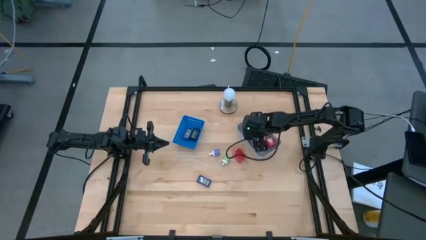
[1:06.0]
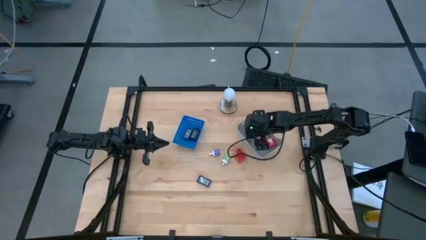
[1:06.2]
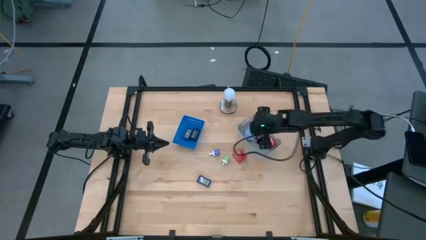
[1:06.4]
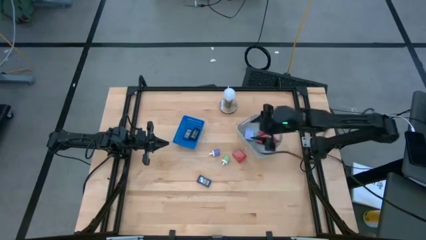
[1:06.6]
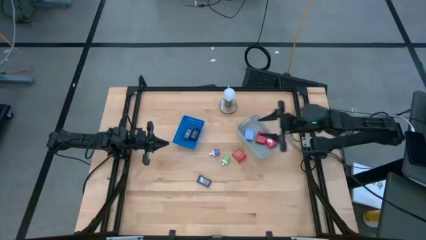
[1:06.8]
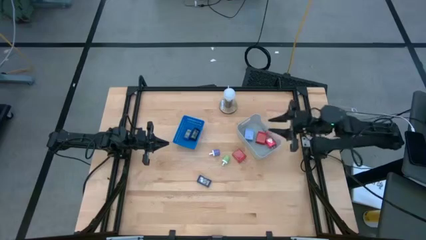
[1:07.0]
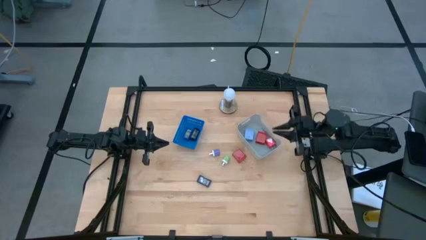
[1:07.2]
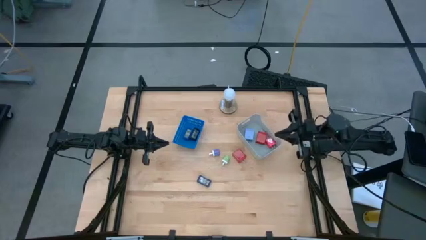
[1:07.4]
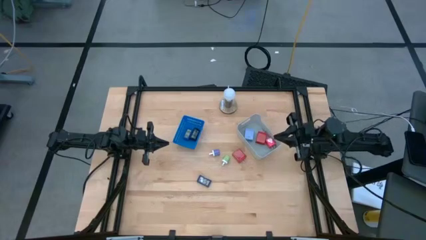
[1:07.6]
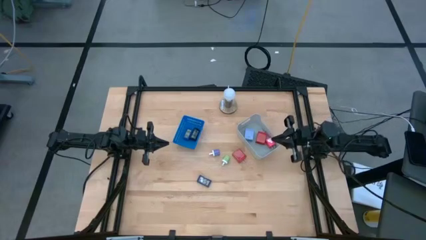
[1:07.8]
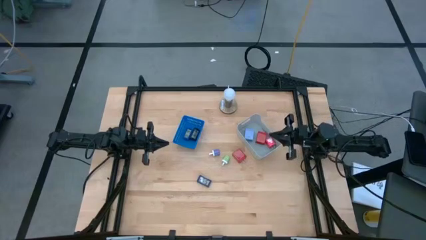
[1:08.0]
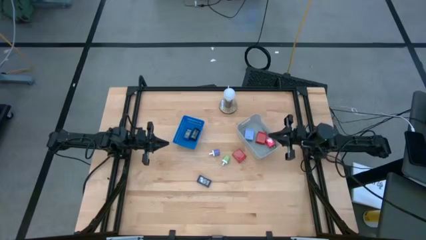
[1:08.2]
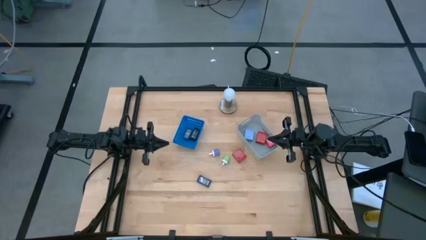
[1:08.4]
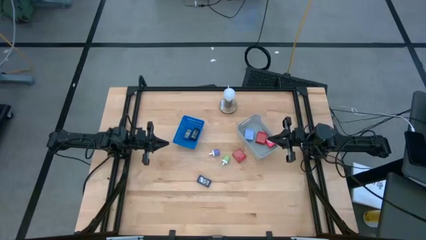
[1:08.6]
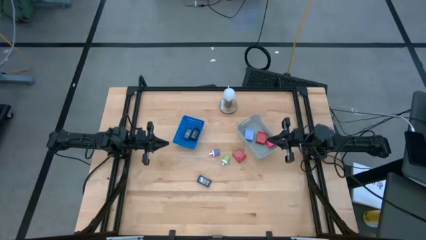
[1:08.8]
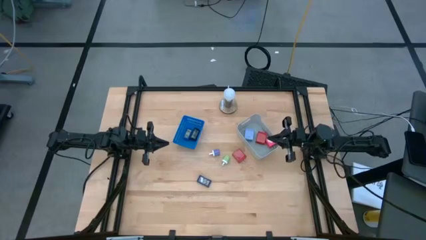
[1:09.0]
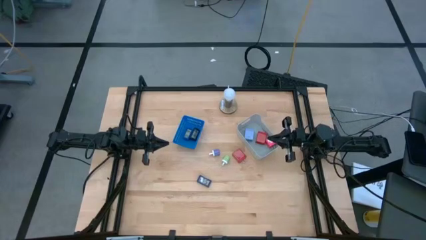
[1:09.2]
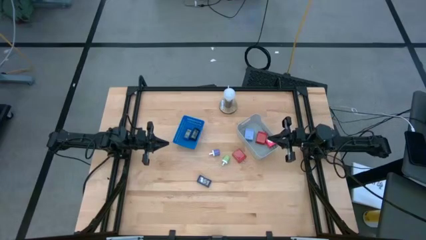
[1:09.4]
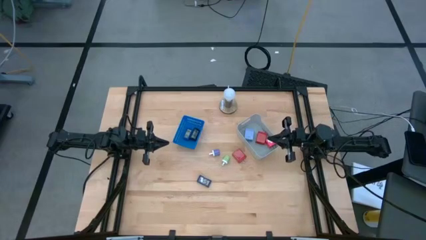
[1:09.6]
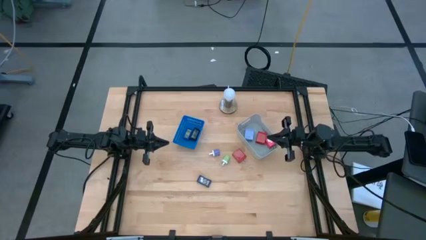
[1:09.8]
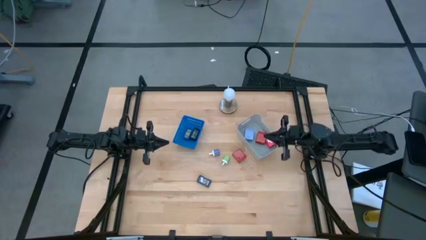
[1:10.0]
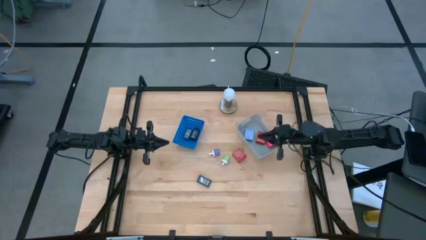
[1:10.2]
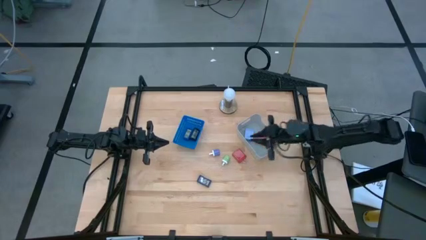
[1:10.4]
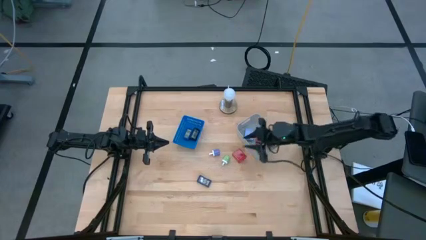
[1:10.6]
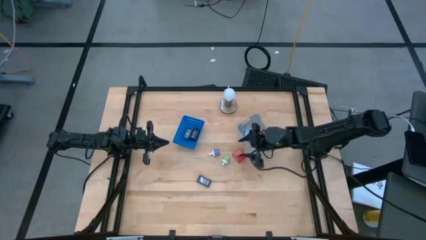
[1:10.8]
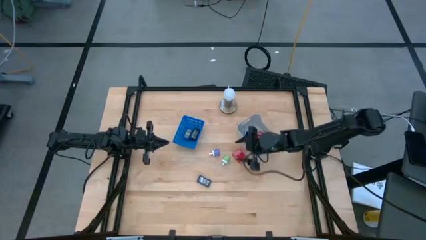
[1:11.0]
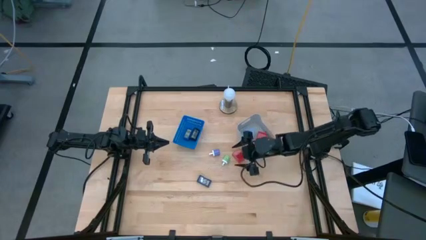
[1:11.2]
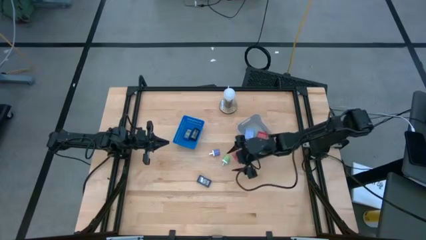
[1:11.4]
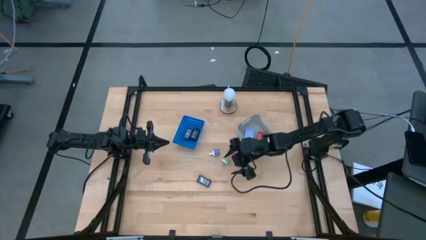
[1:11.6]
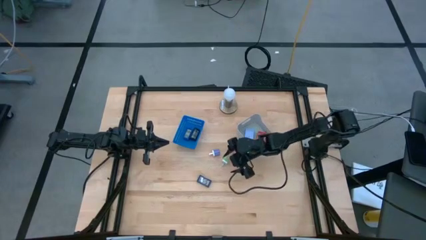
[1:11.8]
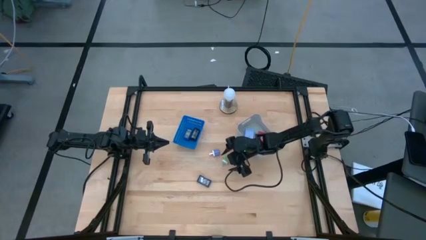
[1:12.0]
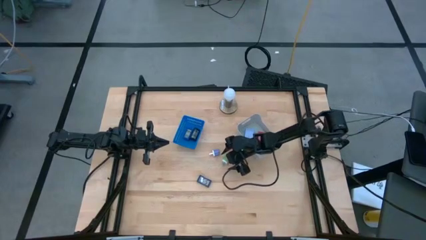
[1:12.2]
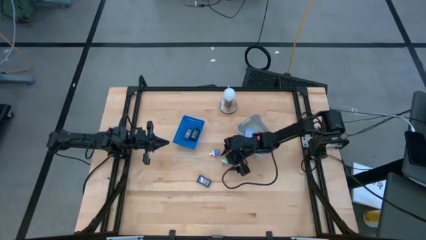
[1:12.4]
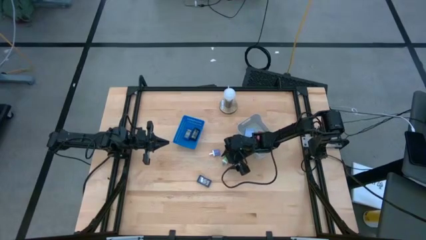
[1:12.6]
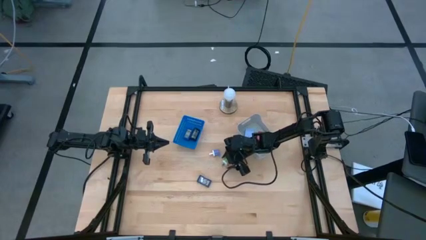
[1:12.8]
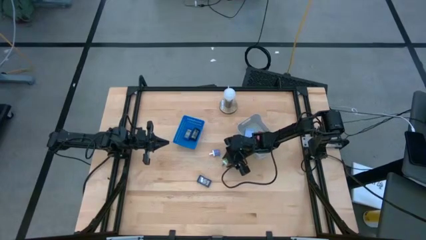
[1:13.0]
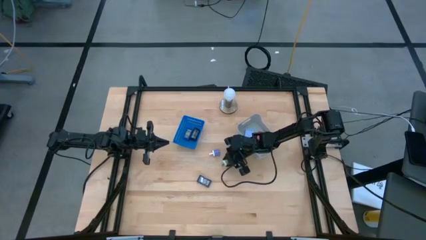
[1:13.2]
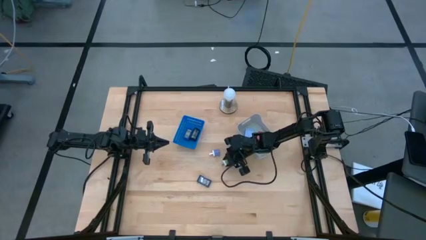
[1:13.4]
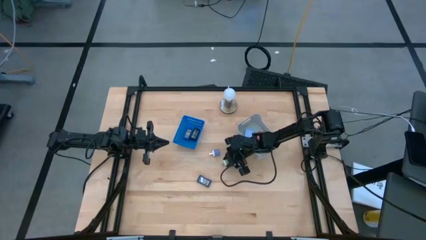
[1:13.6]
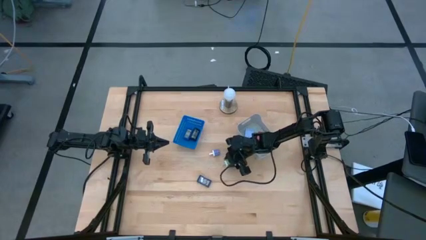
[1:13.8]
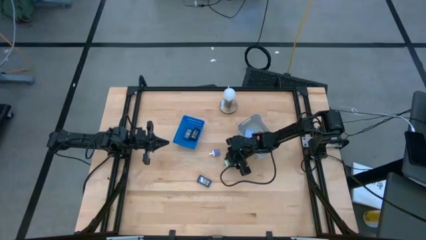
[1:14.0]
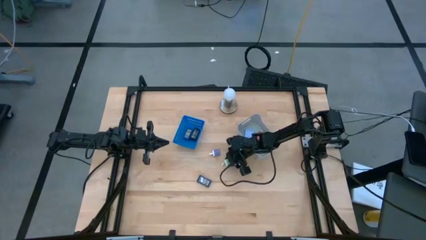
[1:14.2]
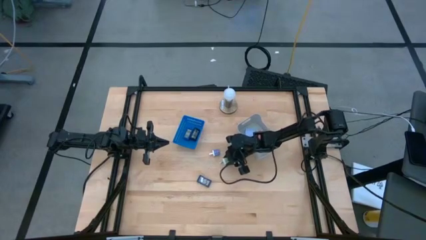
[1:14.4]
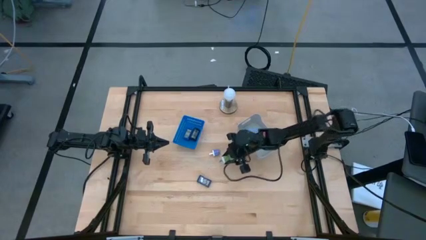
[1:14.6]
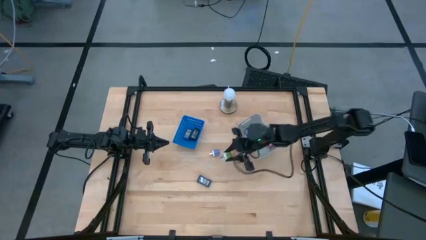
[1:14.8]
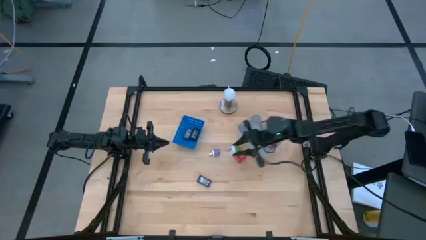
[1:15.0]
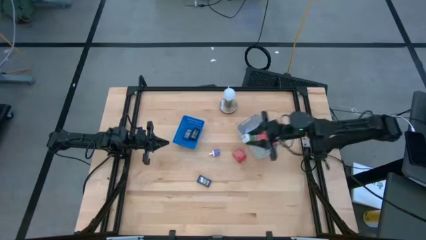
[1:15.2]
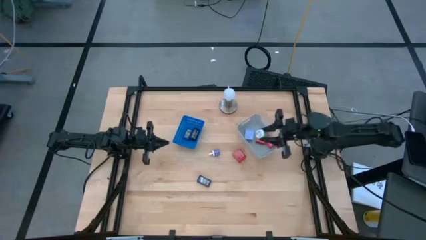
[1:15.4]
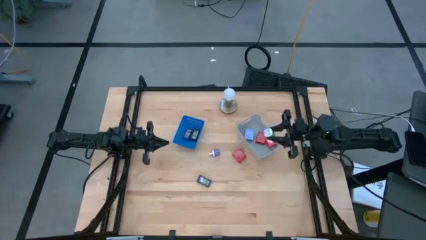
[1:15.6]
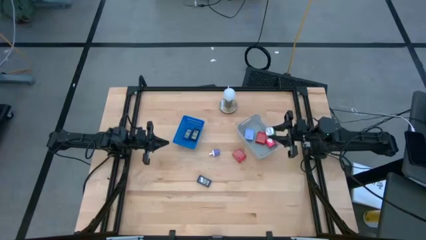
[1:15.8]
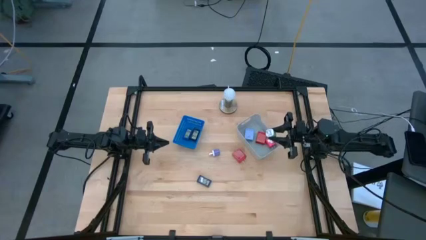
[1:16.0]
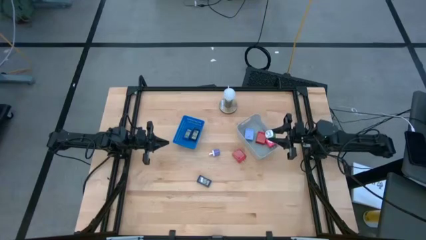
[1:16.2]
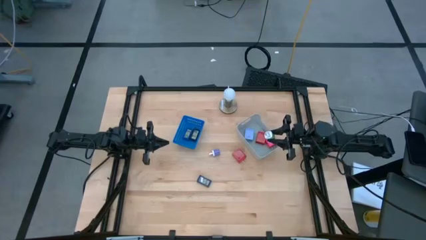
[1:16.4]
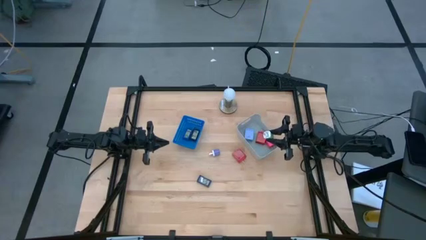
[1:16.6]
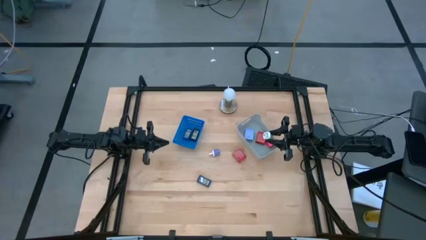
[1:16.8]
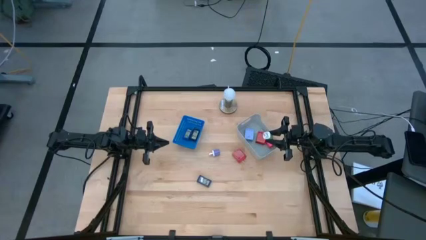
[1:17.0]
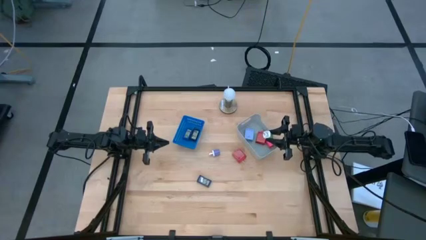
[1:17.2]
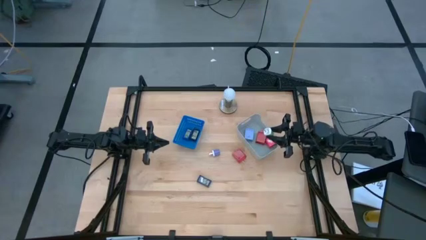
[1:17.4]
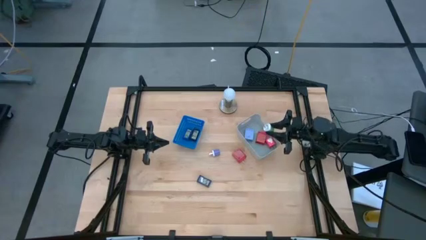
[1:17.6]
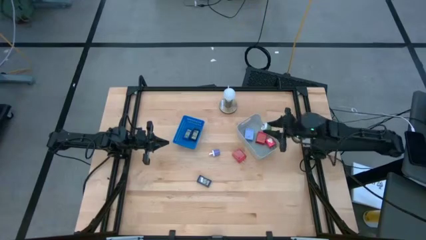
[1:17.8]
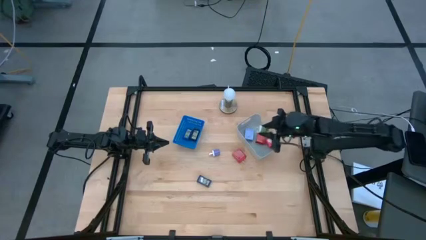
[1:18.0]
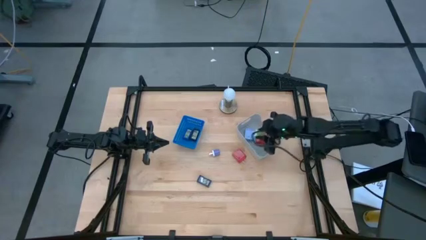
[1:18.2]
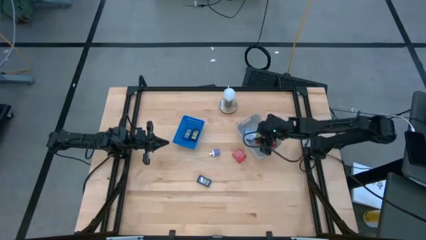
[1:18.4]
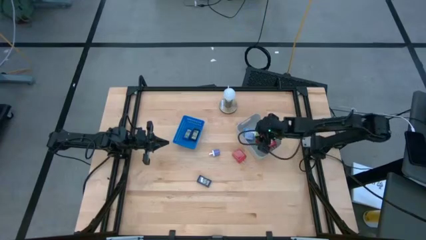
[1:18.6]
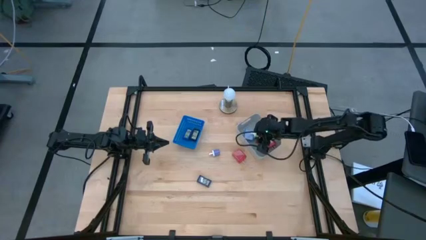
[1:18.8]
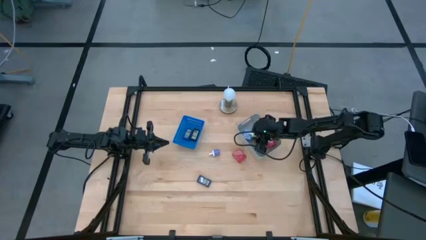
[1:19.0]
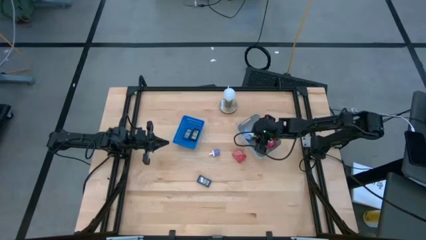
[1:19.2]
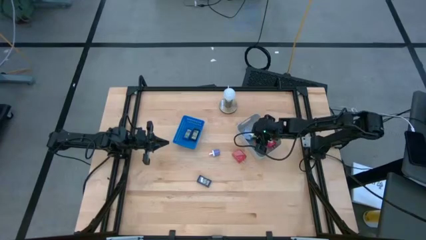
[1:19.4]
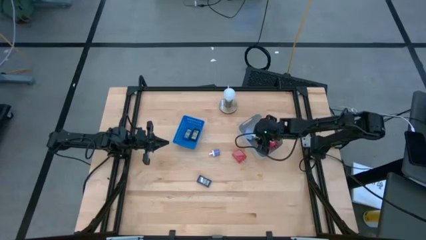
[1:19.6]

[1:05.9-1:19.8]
Task: Pick & Place Office items
Put the green charger into the gray bin
